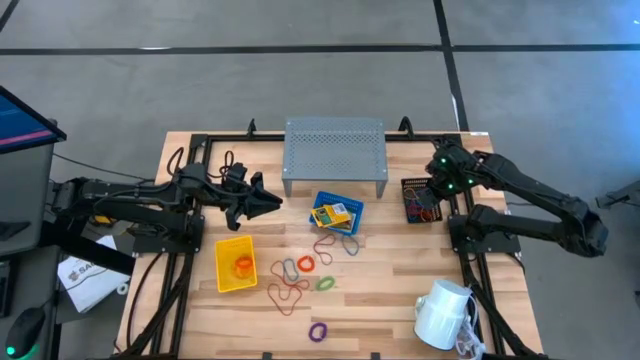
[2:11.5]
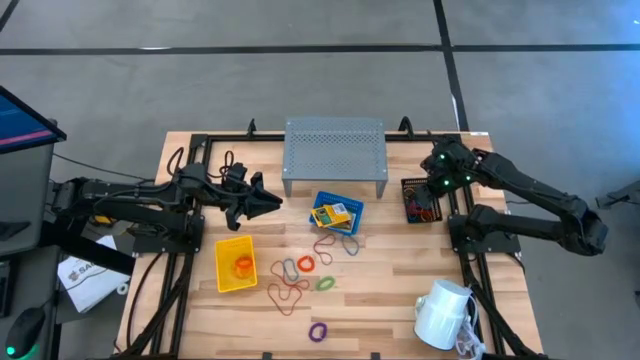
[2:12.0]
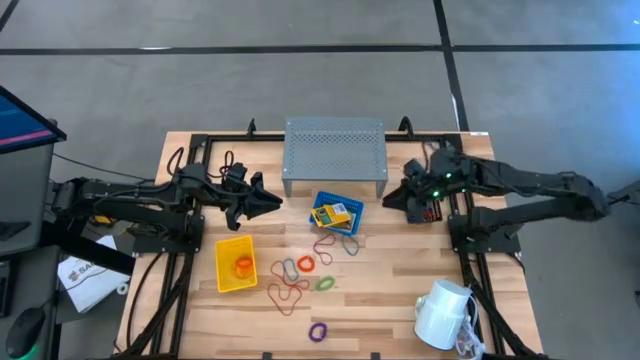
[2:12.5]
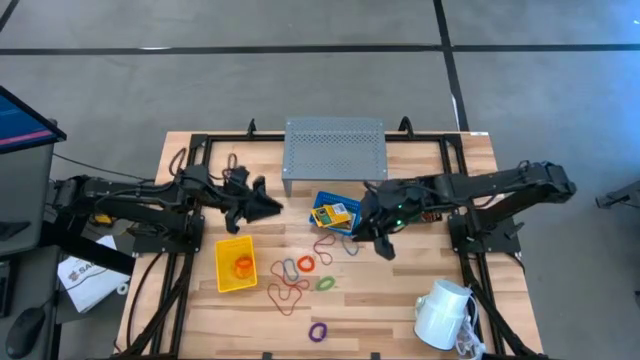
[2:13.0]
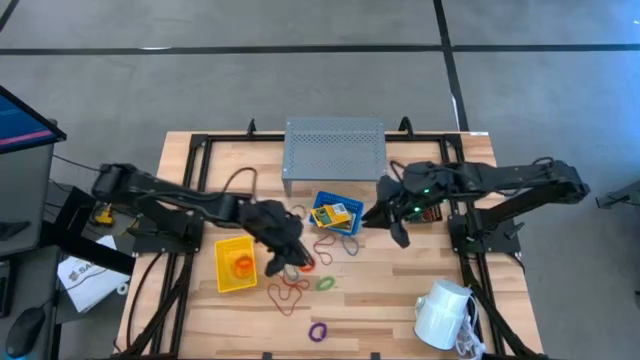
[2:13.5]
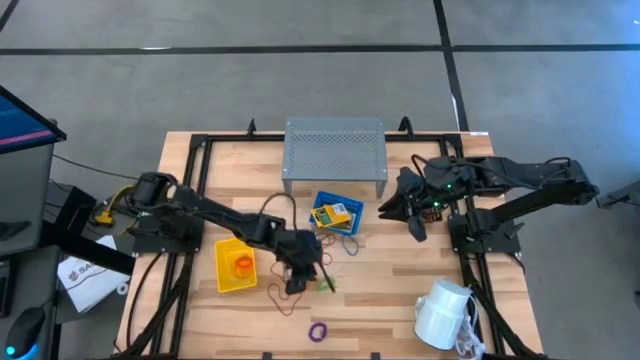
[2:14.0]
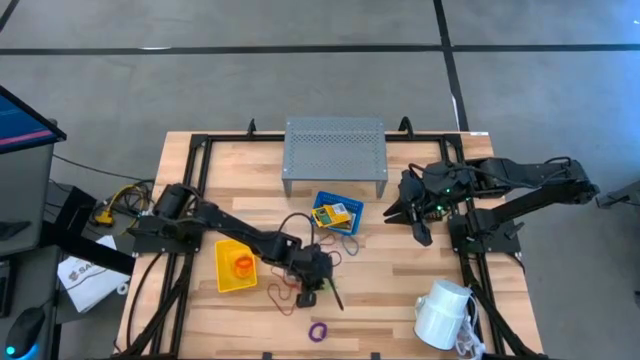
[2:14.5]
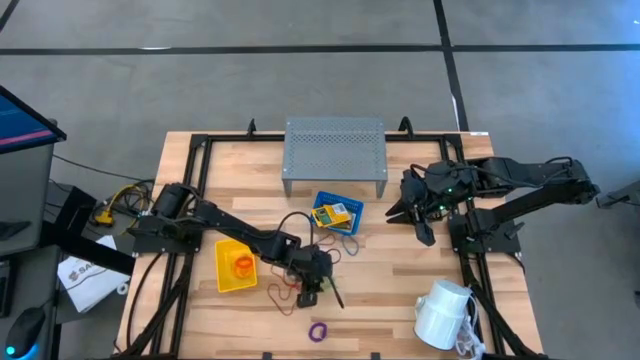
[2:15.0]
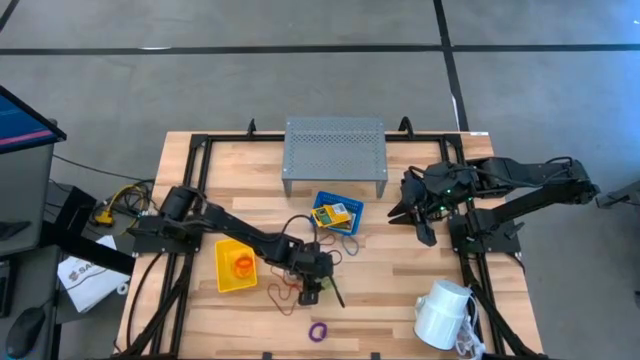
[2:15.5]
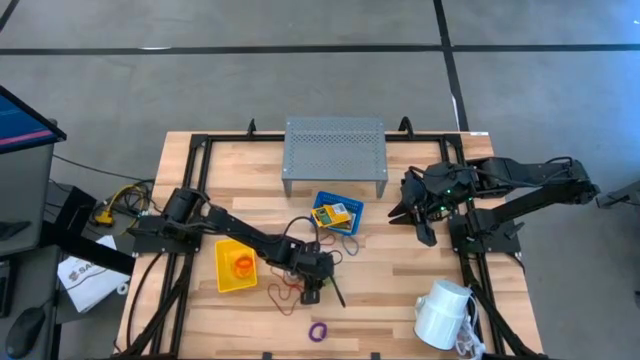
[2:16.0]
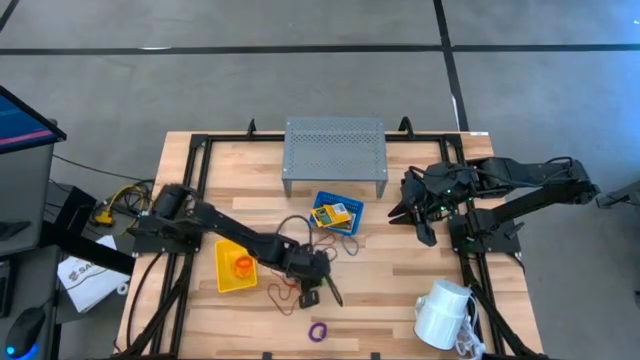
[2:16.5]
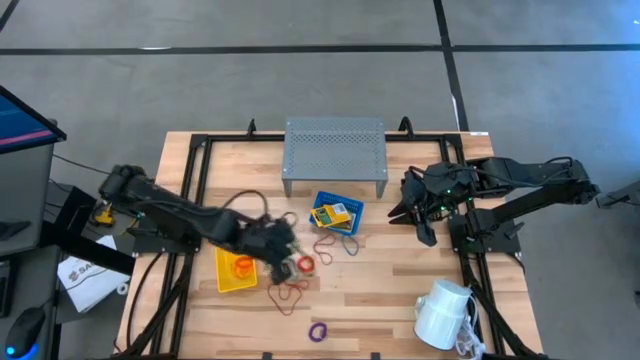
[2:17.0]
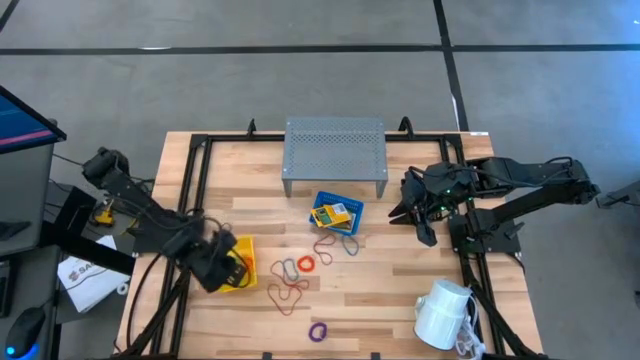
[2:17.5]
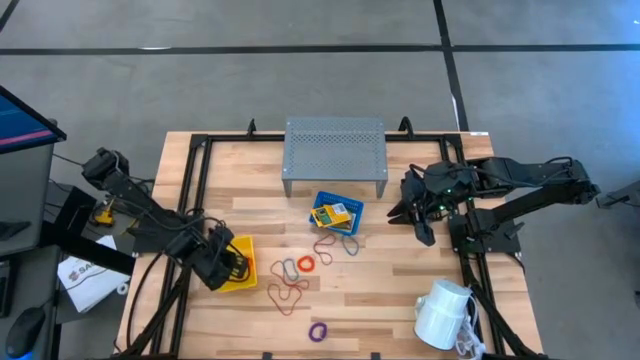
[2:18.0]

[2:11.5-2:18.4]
Task: Pick & Place Office Desk Supplies
Put the green spring keychain into the yellow bin

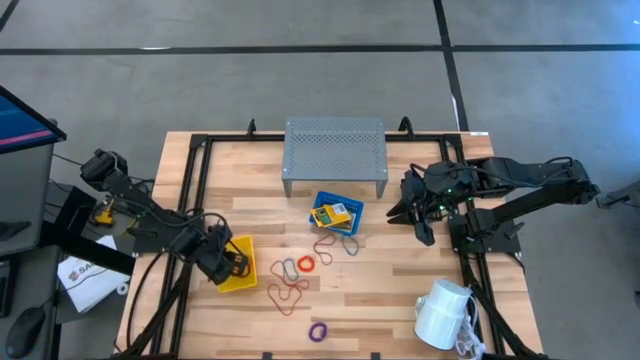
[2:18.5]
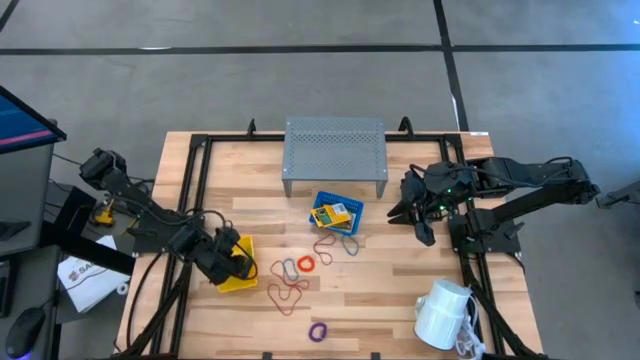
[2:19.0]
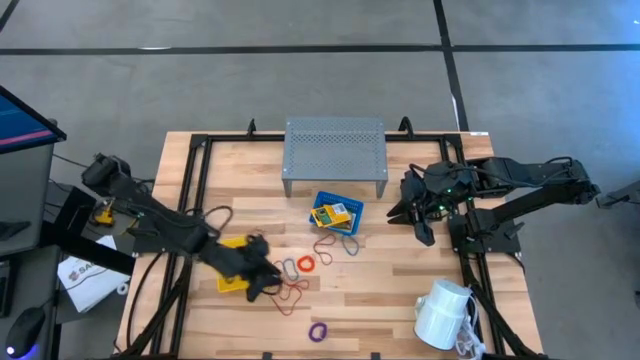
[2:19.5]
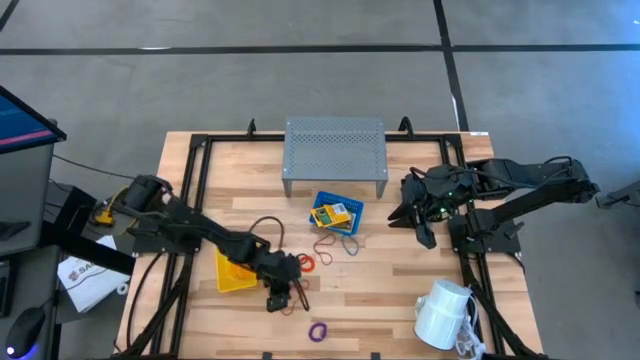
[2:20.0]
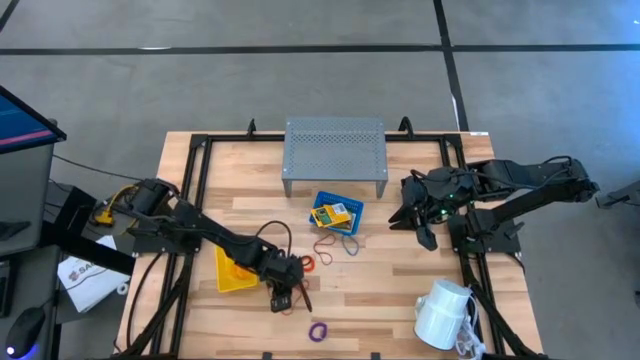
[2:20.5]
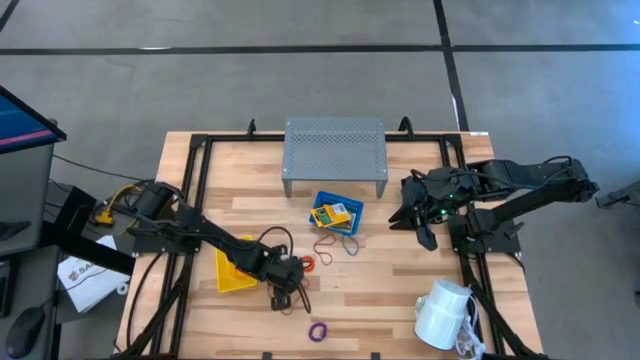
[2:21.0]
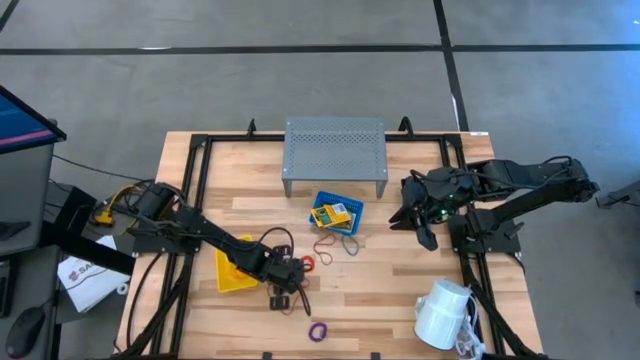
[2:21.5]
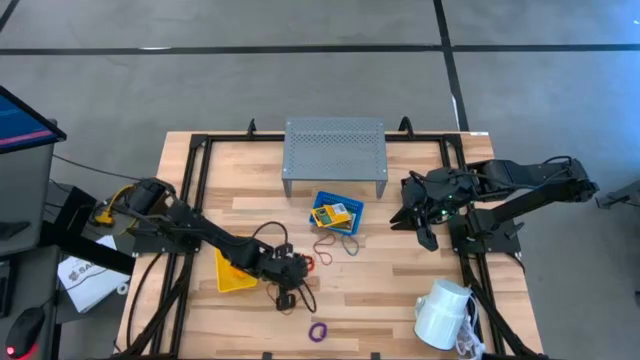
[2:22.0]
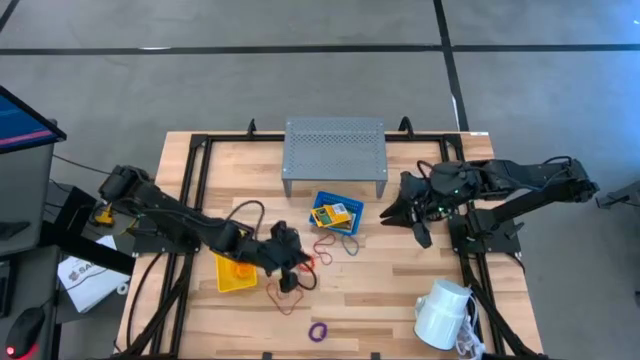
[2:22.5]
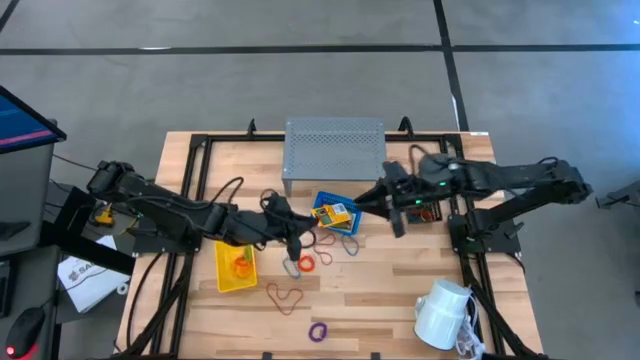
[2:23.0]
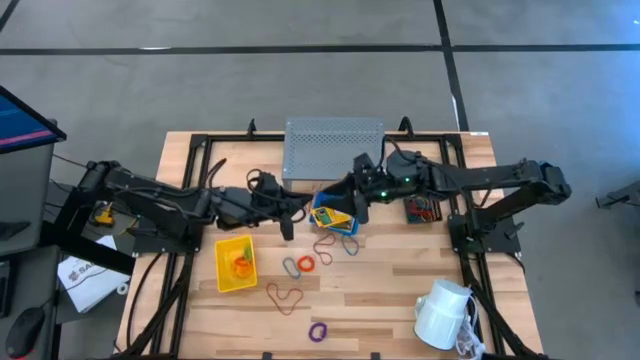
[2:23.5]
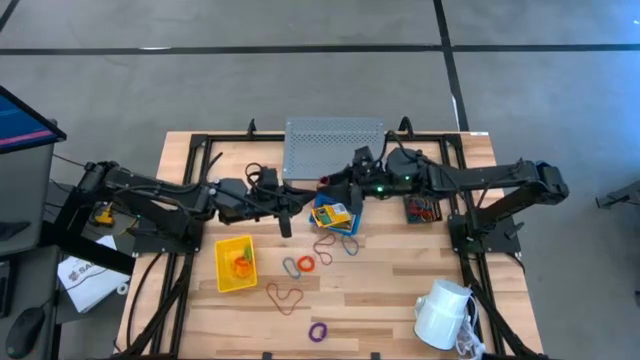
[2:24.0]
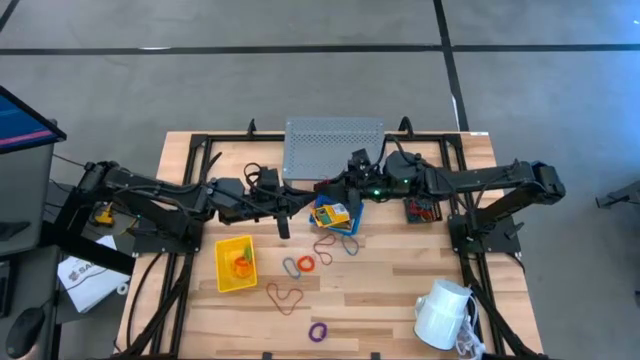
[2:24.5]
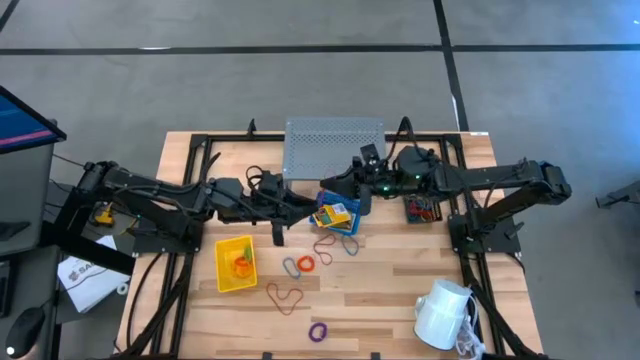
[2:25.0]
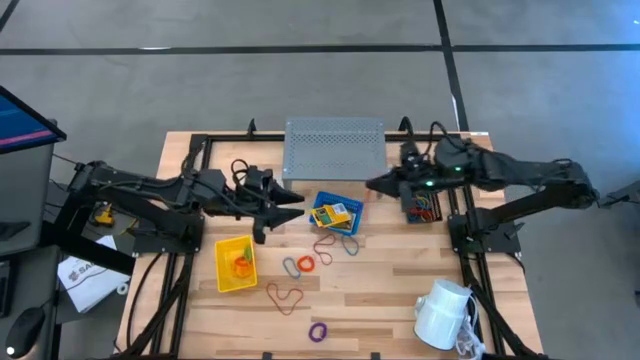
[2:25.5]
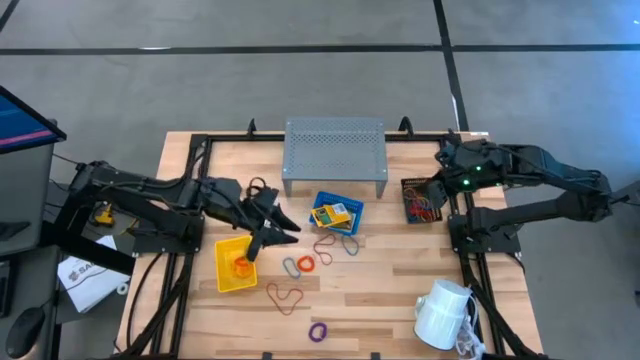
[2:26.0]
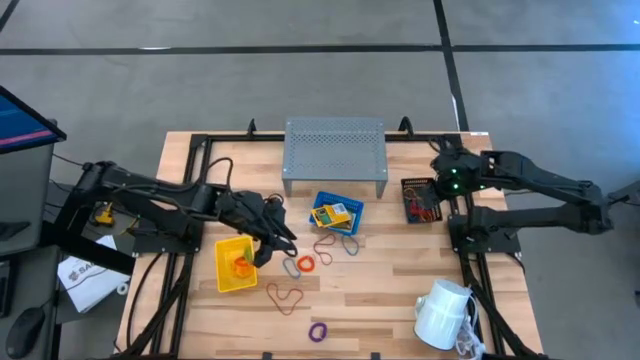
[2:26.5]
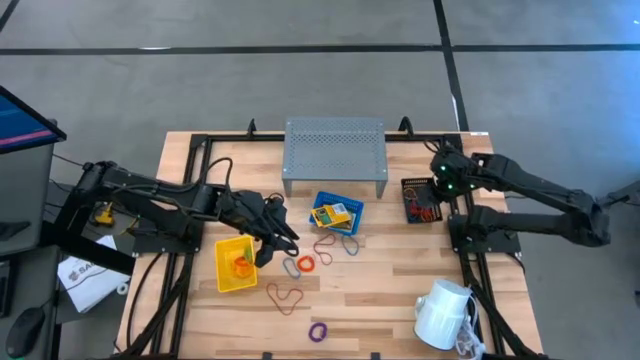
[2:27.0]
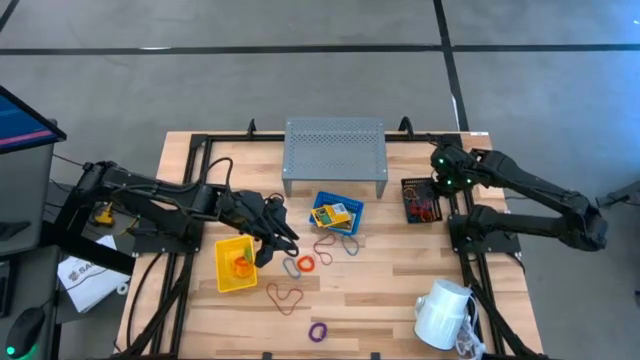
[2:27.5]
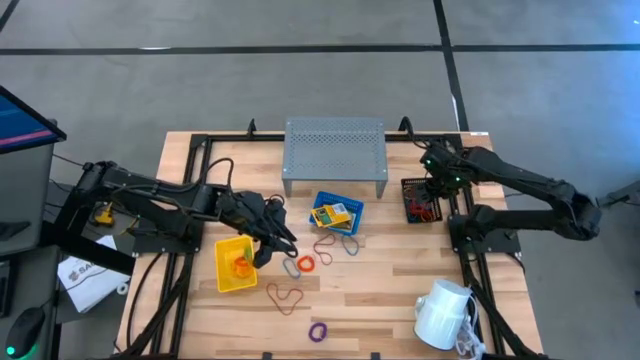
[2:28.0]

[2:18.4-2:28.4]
Put the red rubber band into the black bin

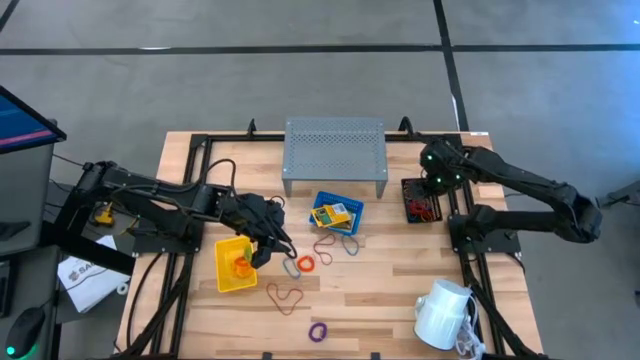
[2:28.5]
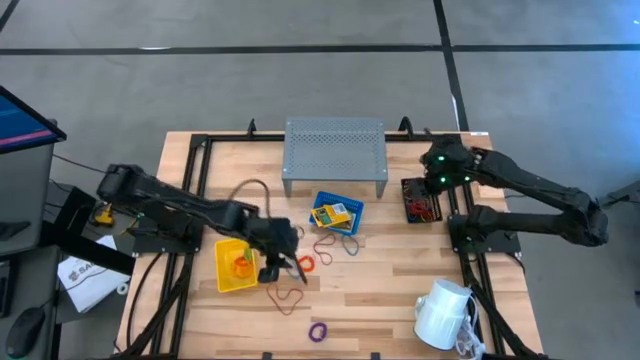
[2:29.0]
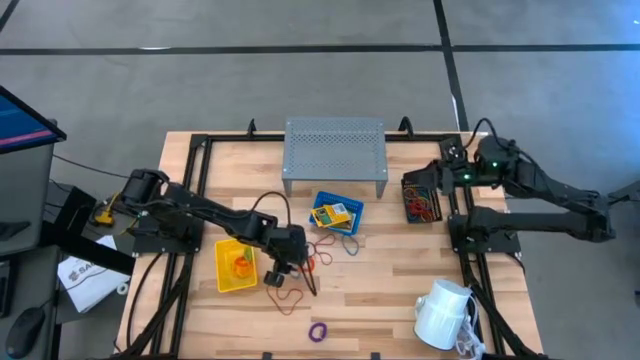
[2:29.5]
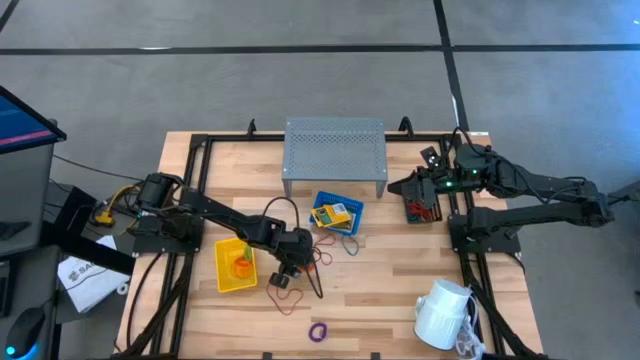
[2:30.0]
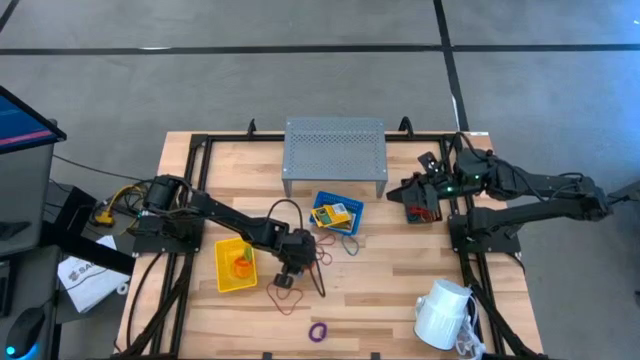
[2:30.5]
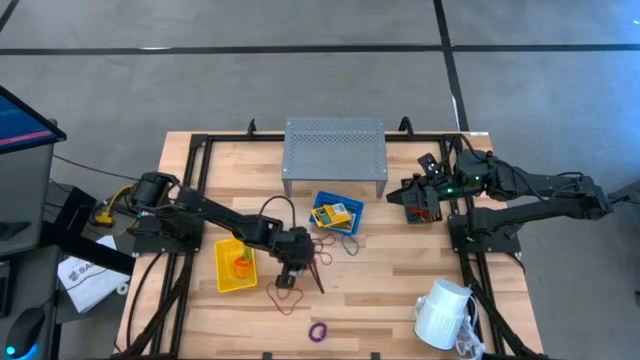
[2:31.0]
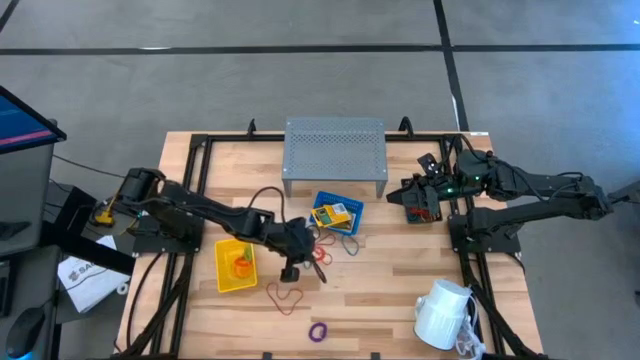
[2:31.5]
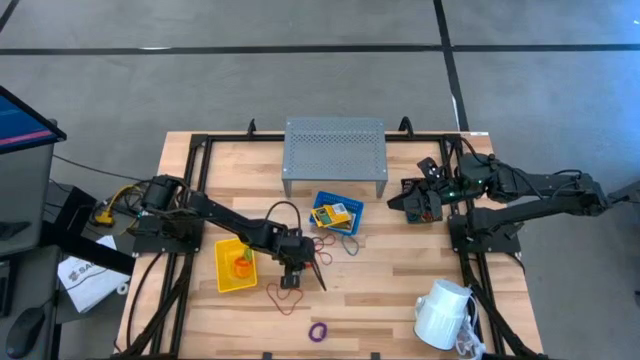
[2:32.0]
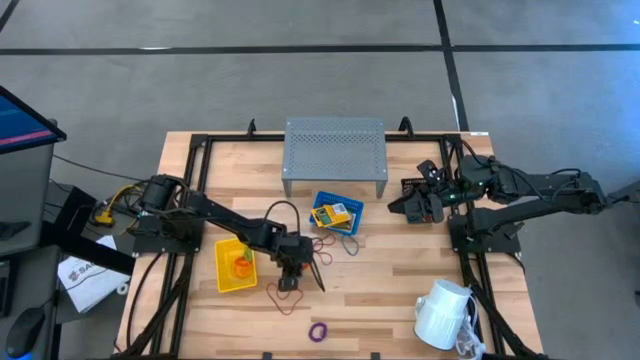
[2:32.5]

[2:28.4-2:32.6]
Put the orange spring keychain into the yellow bin
